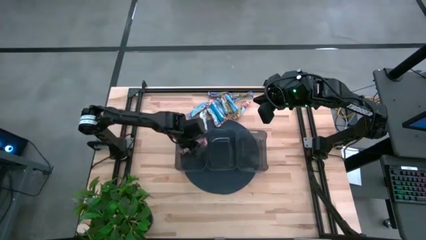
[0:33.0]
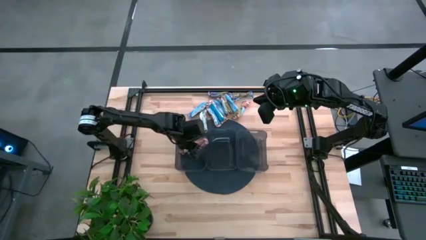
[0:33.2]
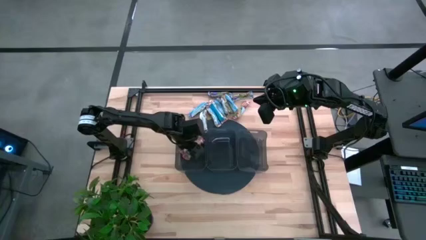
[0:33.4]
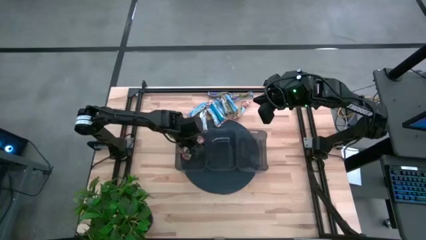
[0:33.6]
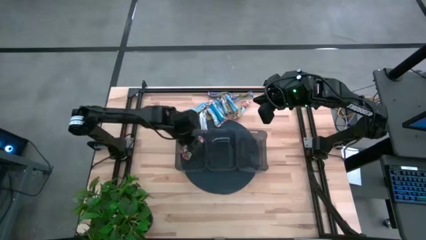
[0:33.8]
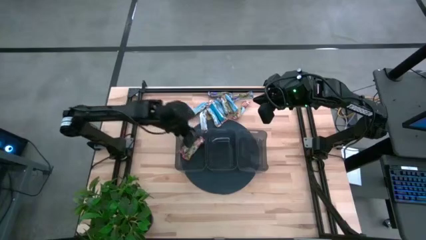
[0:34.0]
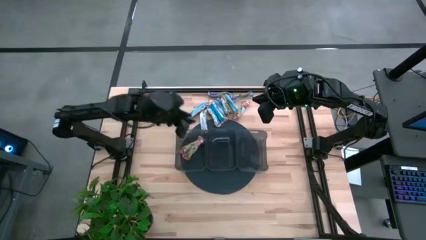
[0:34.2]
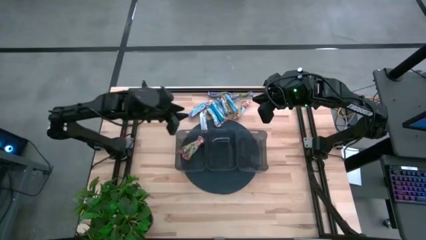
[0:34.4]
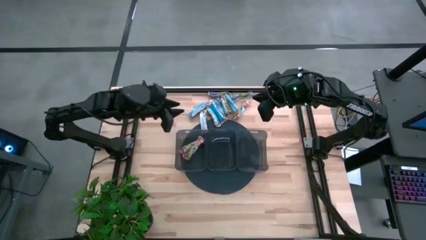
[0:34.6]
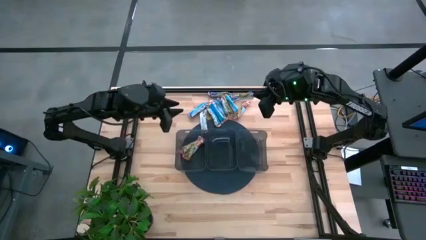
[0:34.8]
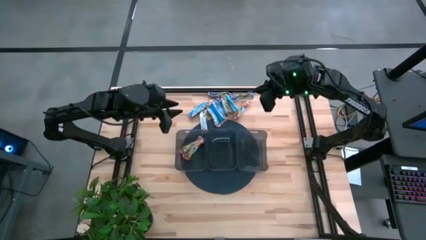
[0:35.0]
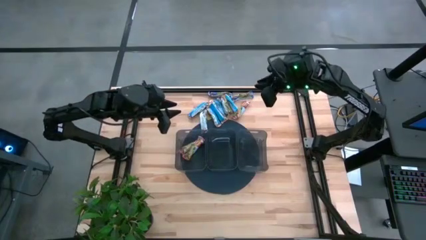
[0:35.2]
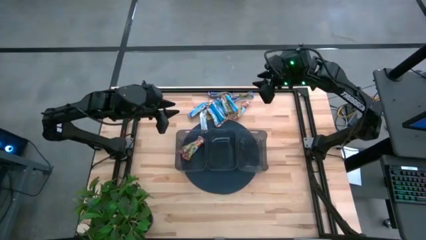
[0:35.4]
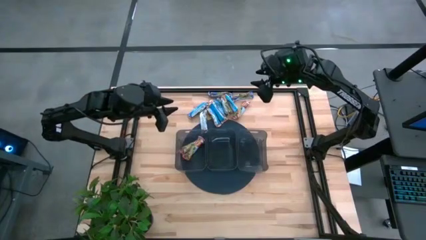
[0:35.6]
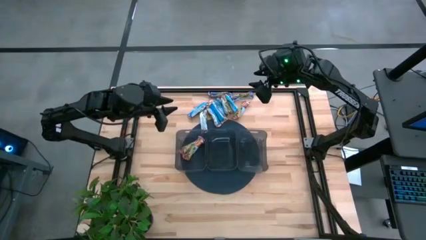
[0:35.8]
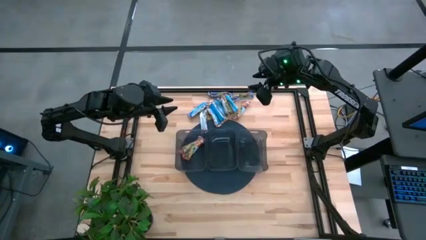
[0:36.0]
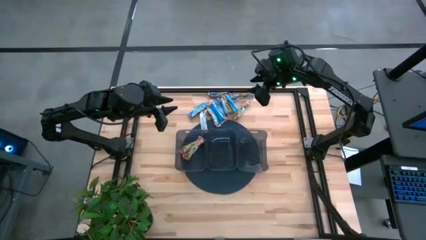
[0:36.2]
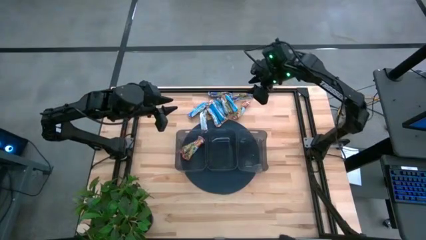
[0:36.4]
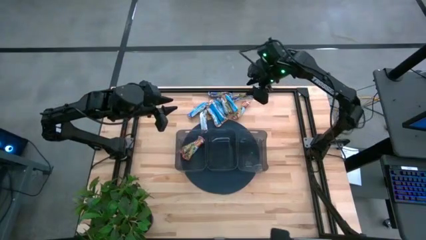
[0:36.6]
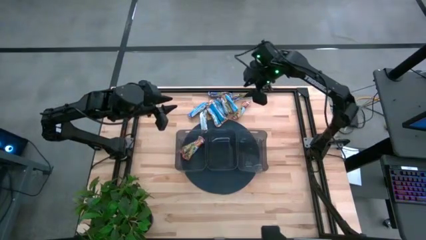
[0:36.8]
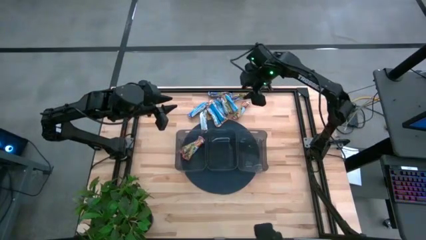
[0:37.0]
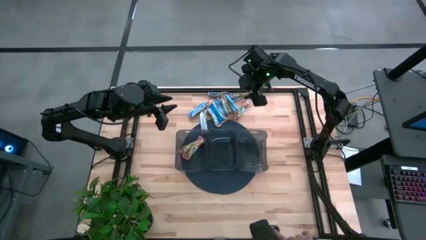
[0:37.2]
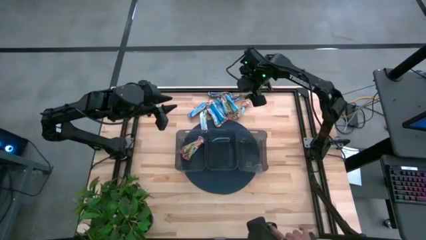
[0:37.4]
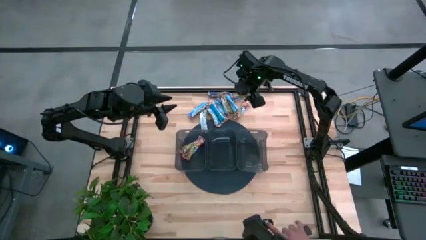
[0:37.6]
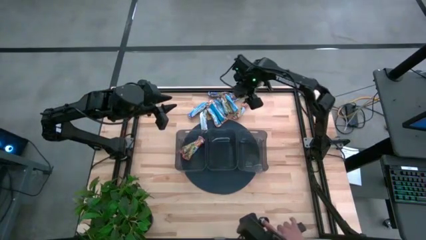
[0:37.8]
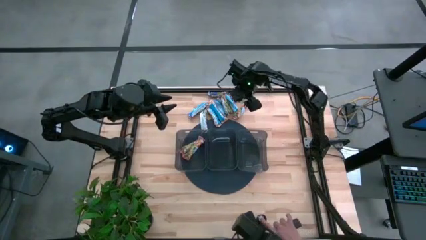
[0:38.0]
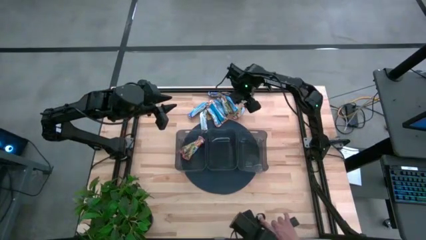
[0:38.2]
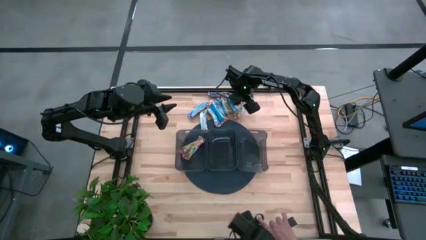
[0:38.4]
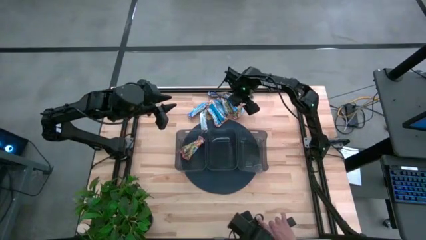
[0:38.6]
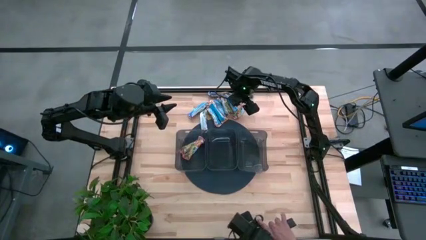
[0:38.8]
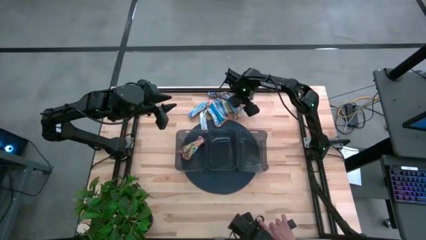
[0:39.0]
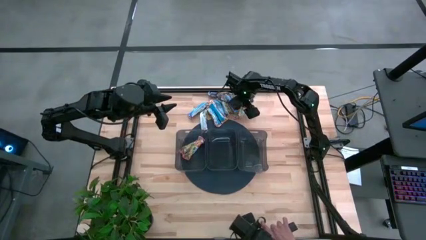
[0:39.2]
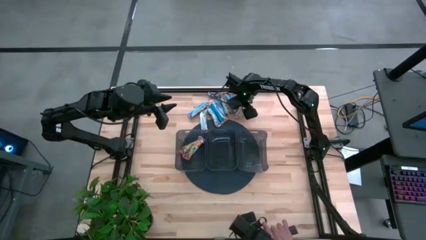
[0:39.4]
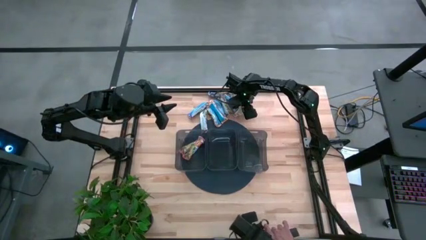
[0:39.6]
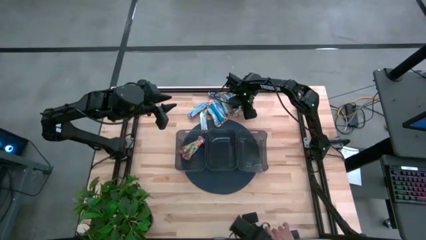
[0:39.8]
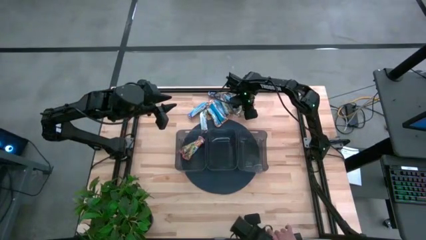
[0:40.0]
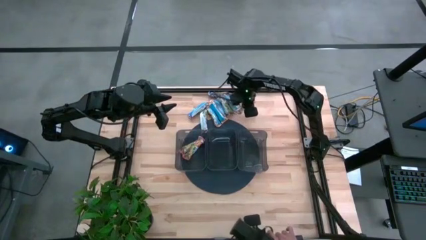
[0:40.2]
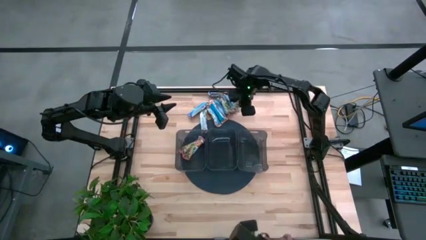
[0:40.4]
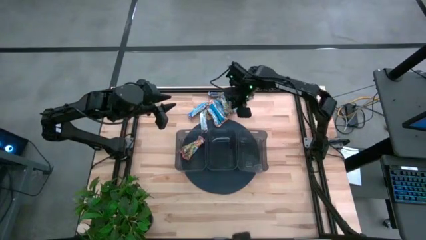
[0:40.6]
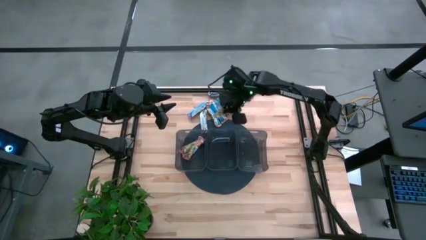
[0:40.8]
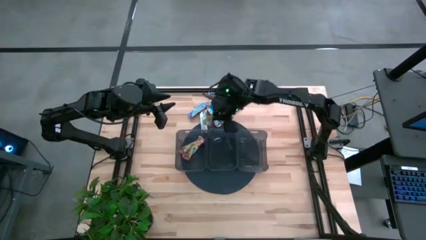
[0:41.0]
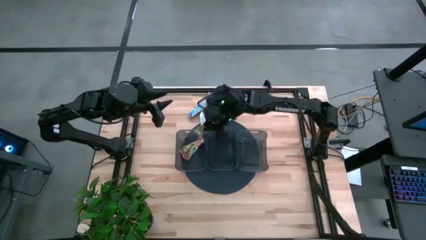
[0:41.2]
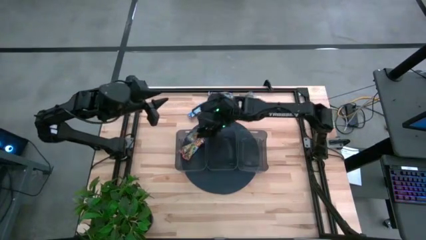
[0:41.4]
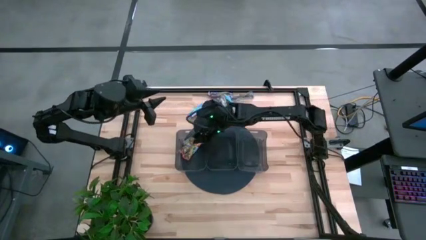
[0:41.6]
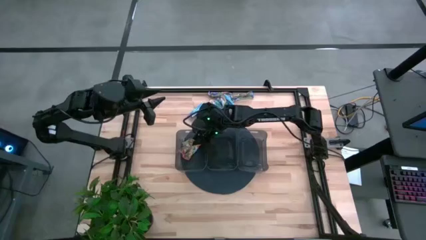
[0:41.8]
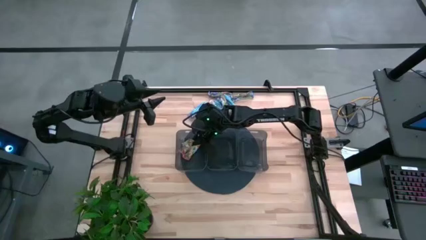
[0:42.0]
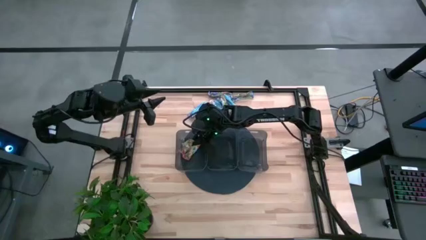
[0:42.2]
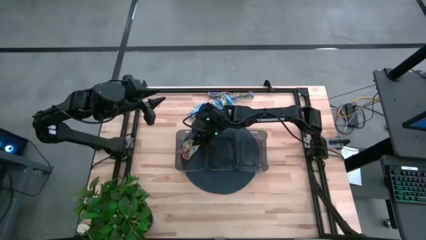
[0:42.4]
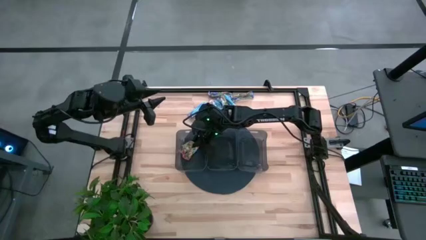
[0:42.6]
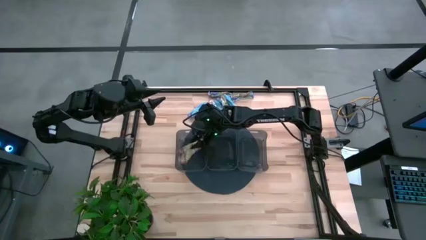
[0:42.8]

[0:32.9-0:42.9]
Task: Pick and place Granola Bars by type
Put the red granola bar into the left black bin
